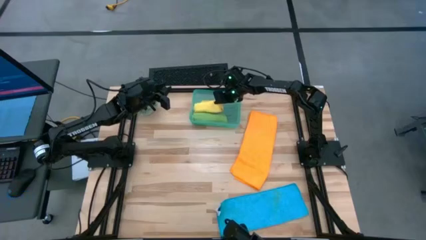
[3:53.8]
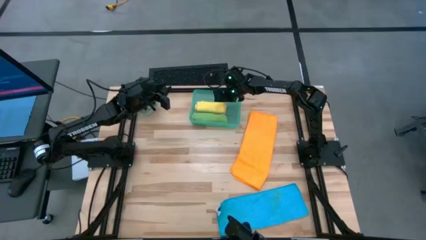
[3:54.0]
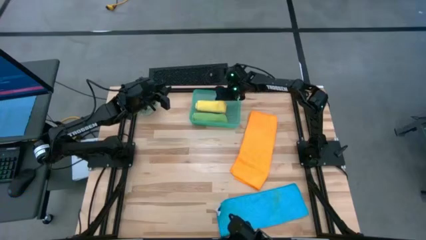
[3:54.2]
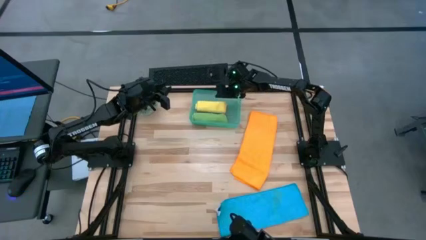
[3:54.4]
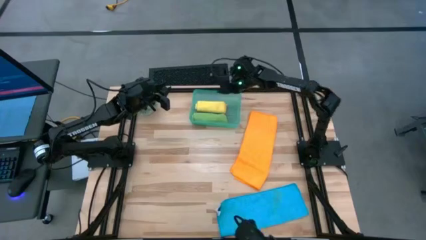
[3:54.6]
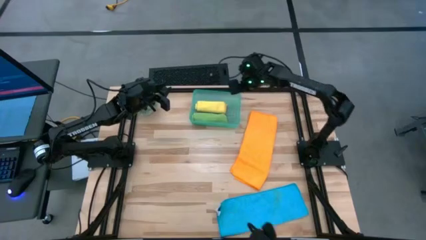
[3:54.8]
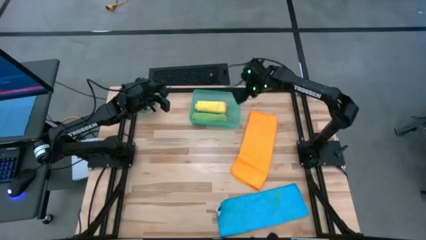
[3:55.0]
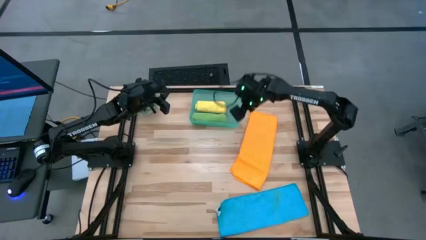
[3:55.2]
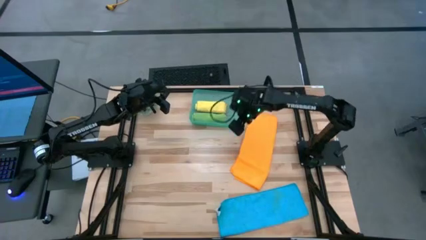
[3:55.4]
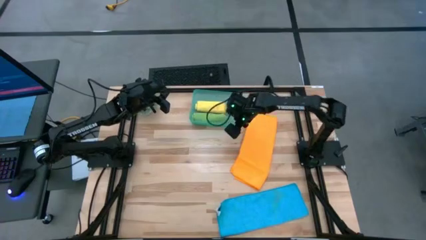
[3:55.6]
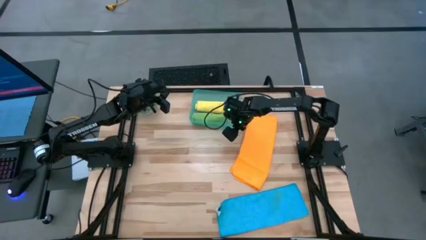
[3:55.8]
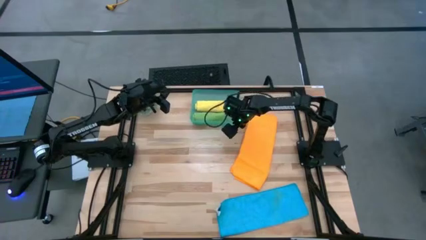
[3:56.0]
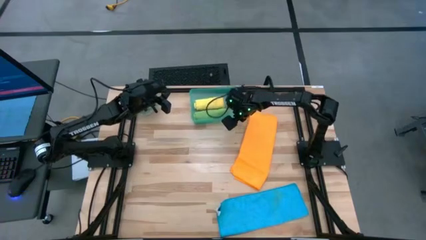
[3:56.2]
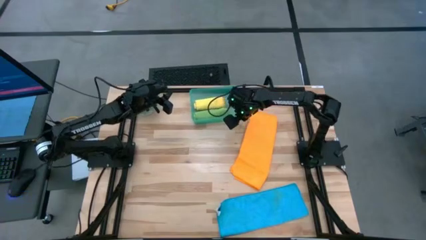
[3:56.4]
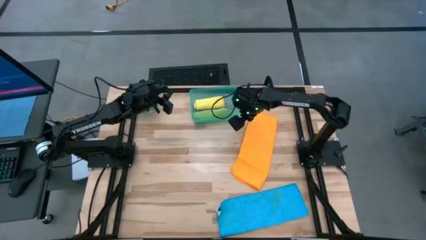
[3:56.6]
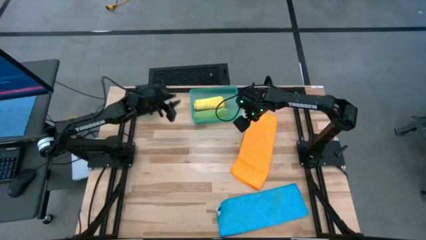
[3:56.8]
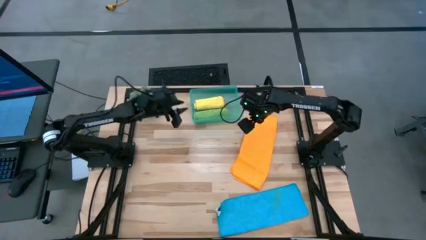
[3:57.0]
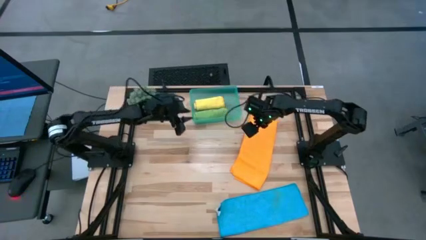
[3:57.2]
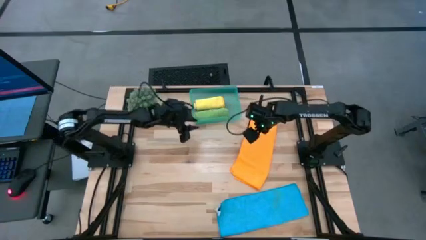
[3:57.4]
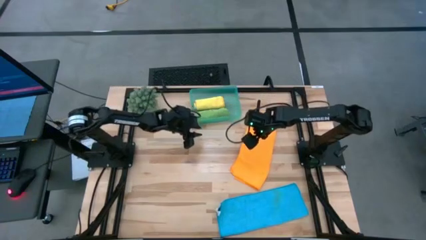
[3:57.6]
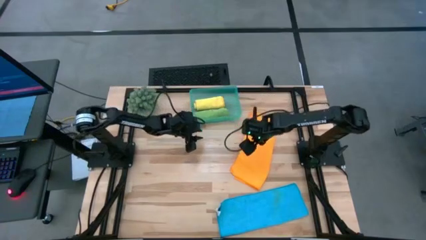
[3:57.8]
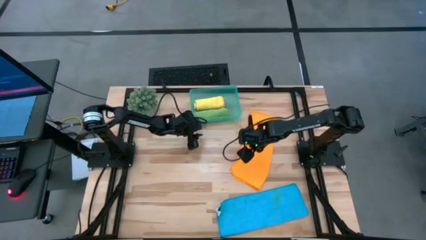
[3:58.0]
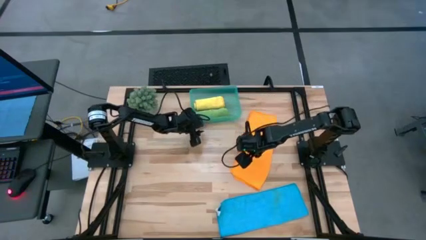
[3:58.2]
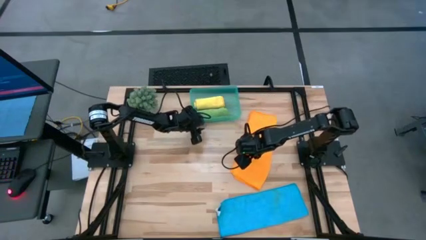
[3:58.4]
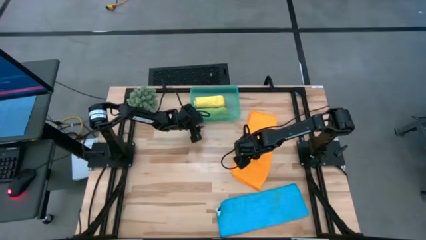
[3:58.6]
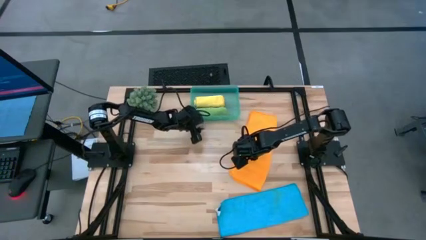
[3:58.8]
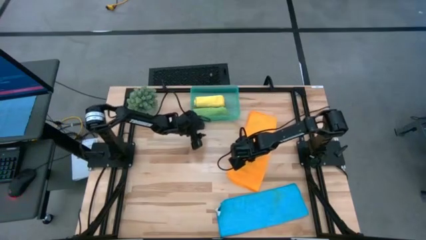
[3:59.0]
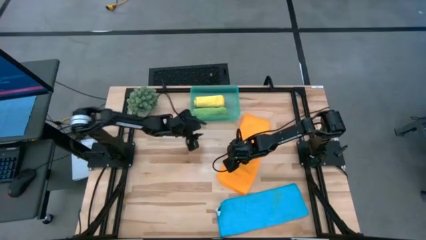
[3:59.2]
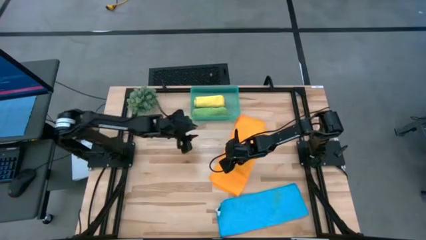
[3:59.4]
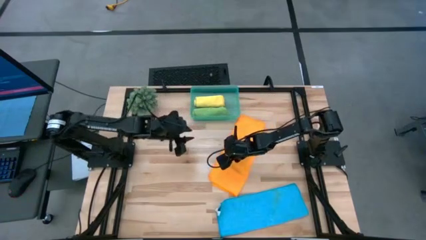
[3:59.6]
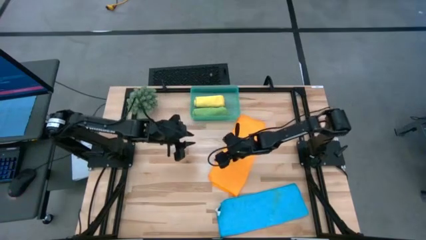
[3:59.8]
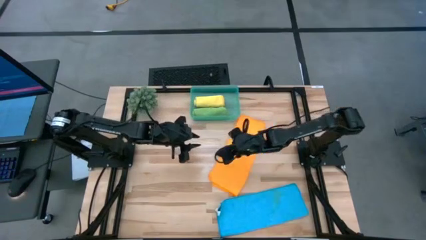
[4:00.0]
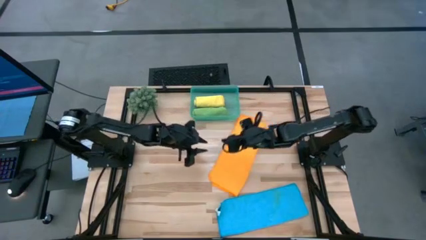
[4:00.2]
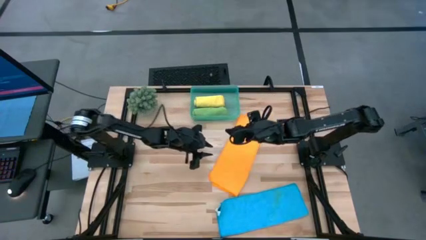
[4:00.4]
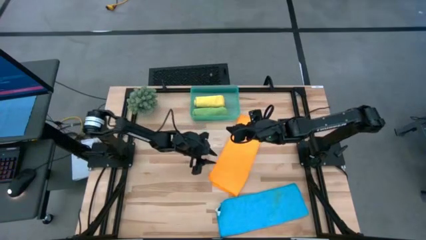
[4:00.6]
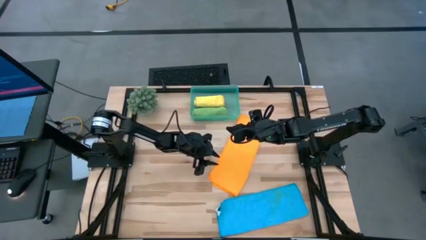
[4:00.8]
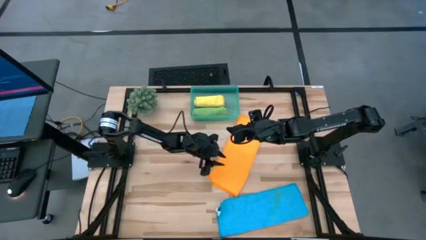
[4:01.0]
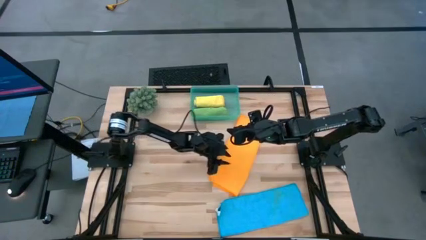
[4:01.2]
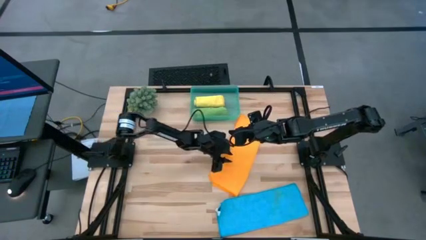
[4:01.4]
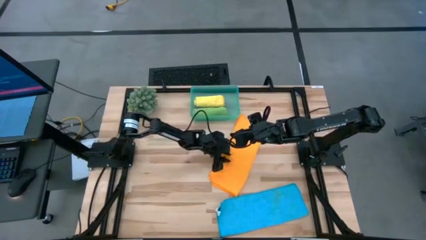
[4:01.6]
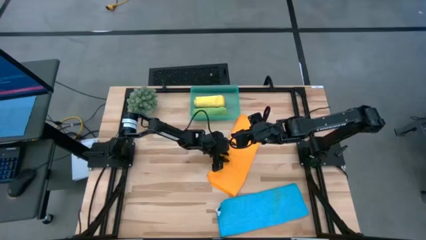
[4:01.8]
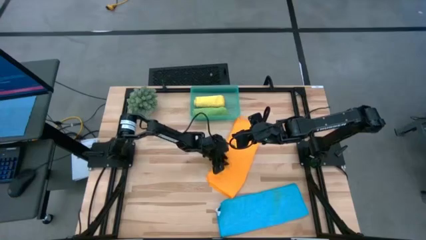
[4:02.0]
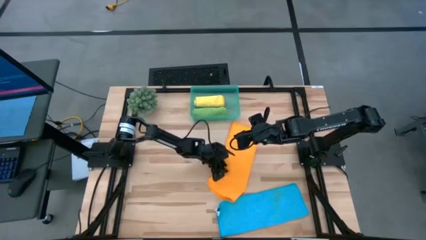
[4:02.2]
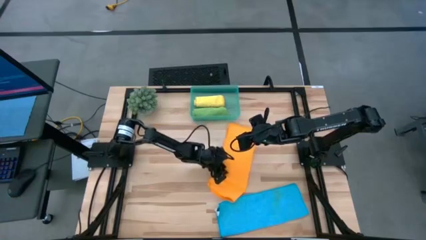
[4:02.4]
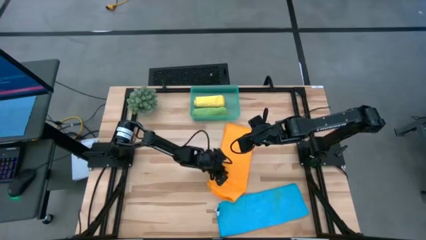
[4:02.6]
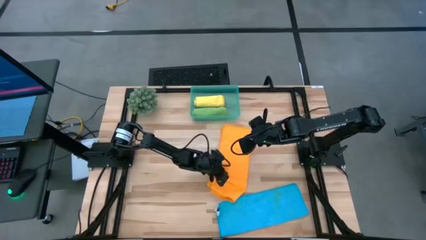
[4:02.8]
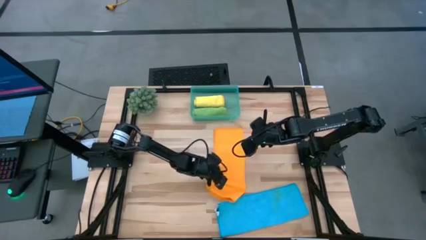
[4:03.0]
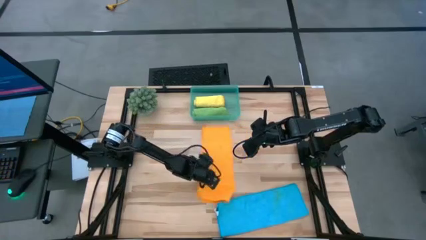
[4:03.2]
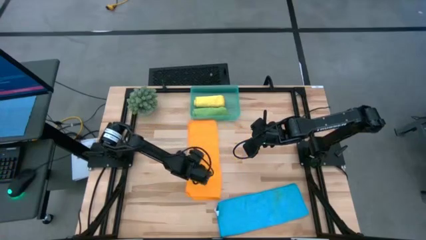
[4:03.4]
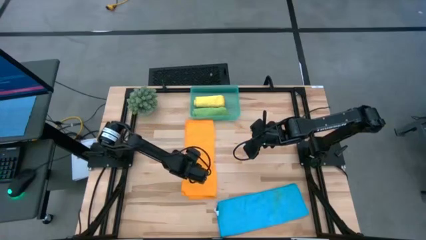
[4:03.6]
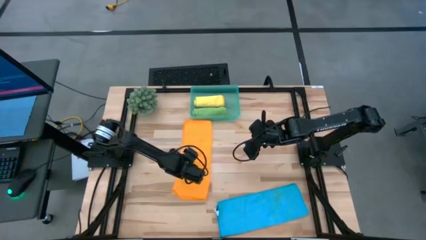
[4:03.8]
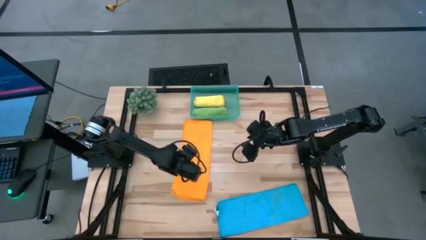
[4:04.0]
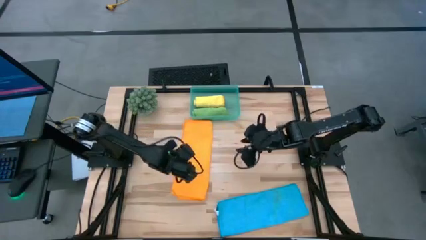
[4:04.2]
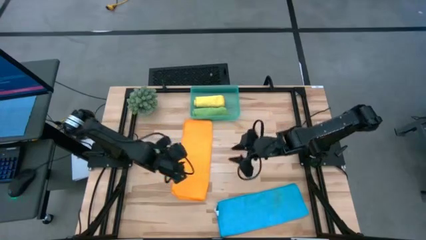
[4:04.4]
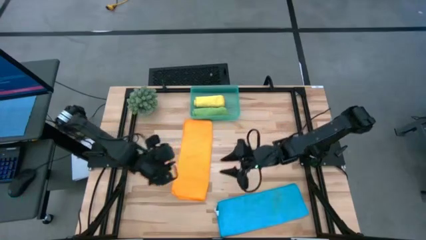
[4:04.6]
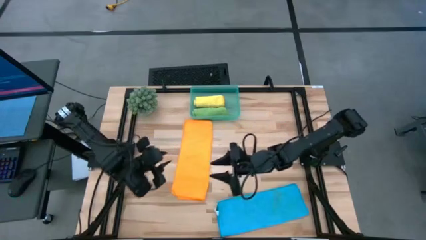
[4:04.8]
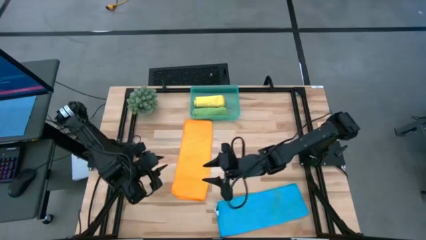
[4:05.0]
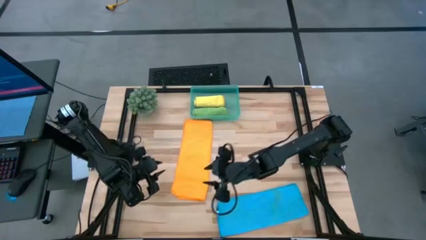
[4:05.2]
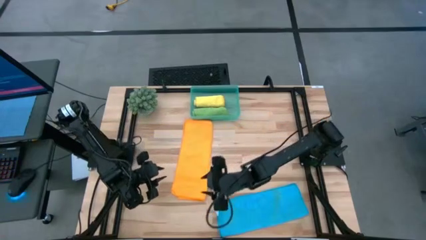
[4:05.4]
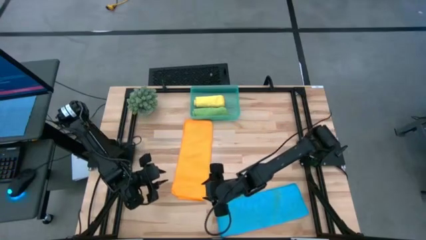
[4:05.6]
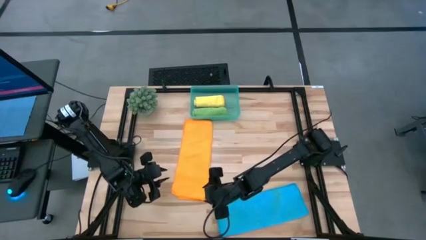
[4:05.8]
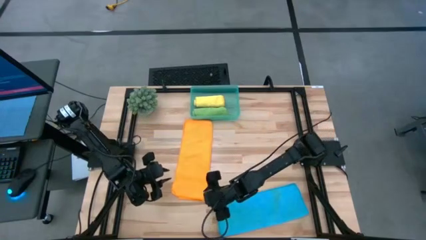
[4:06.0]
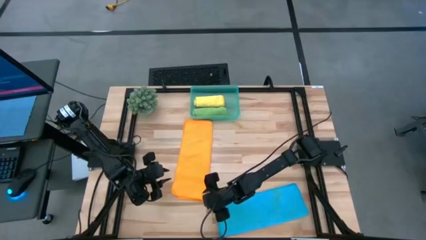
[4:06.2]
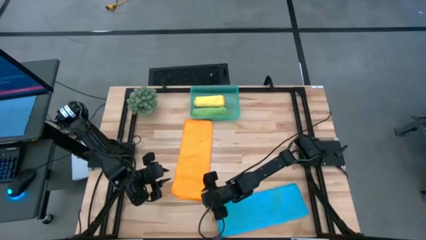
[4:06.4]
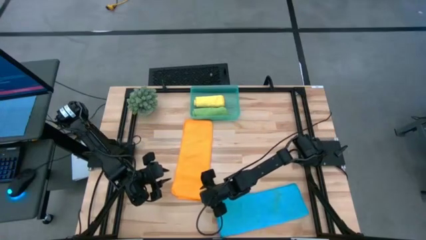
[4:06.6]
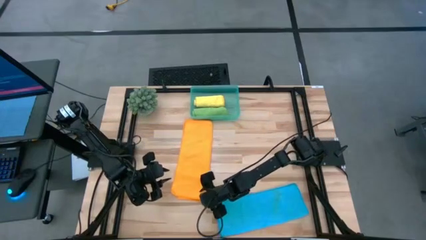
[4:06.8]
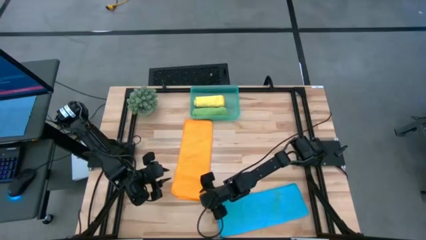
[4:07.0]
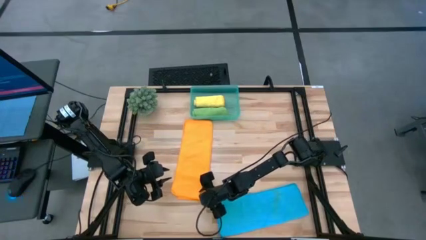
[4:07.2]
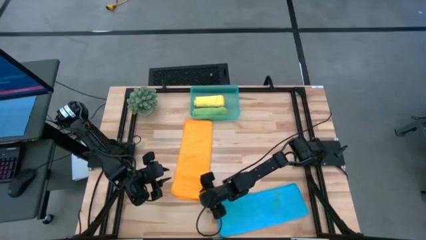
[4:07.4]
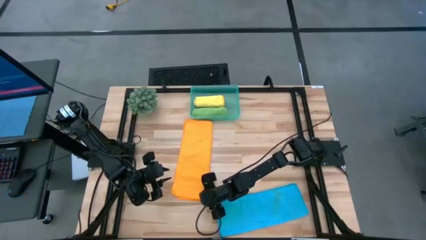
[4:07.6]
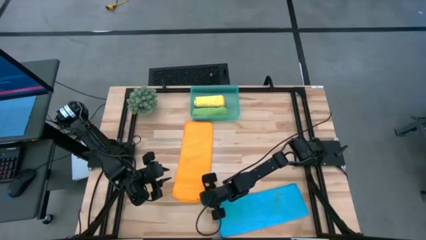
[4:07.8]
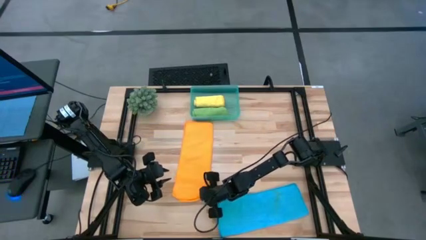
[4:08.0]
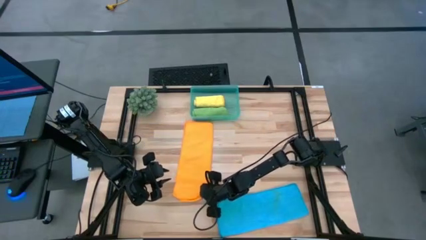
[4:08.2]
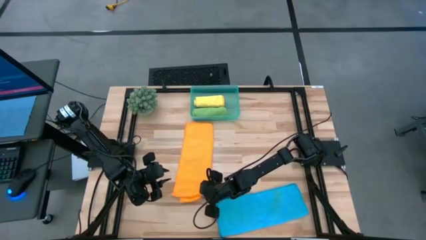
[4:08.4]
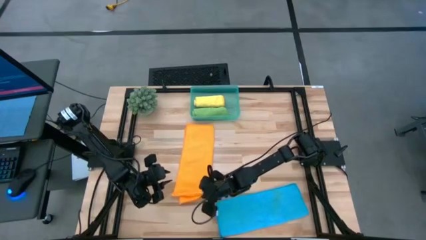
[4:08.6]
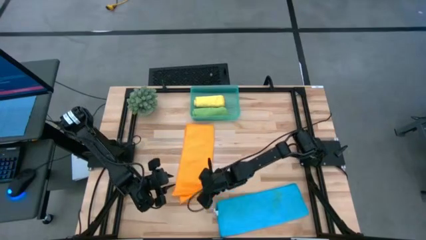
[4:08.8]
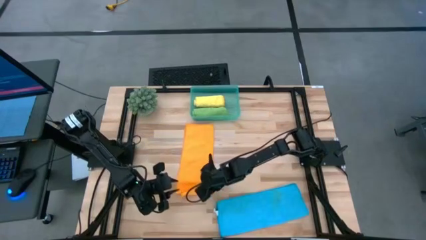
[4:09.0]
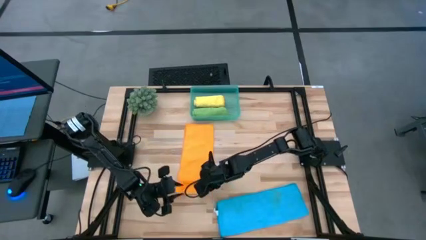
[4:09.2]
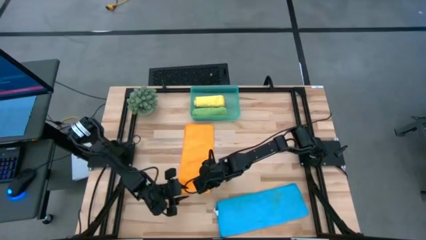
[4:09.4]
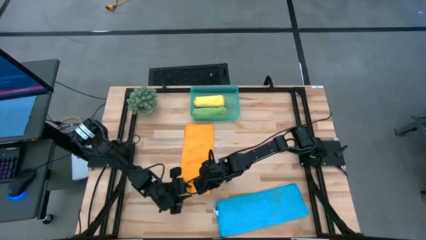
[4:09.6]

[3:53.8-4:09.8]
Task: Roll microfiber towels into tight, uniform cylinder then place into a basket
Roll the orange towel
